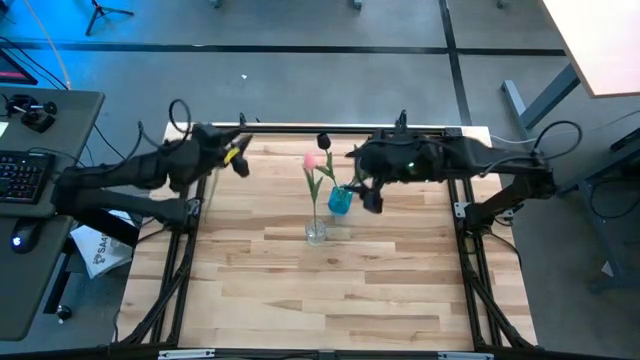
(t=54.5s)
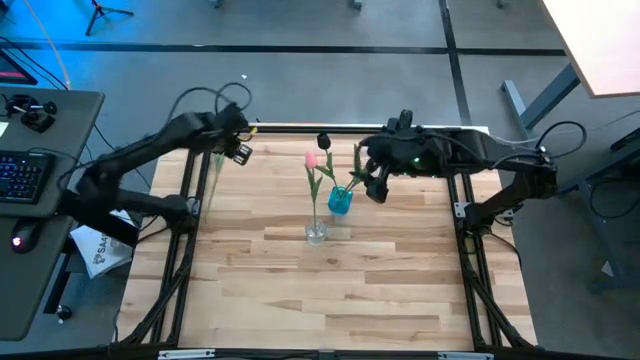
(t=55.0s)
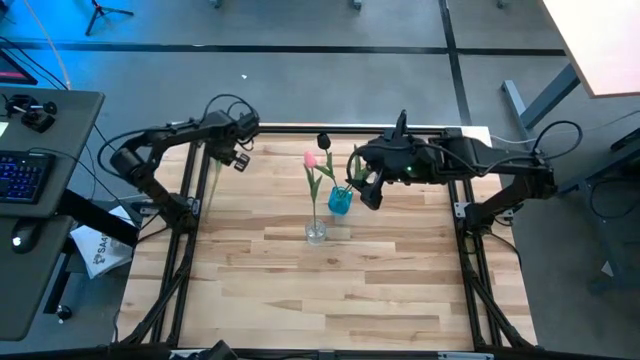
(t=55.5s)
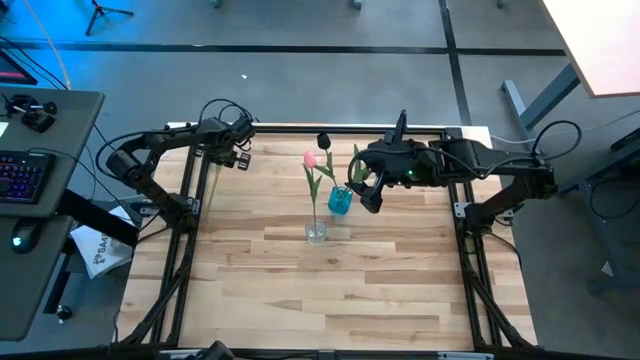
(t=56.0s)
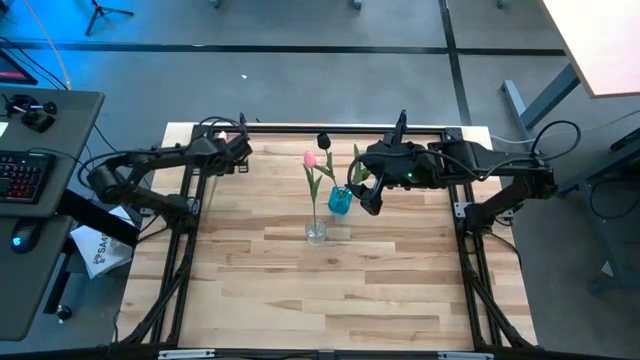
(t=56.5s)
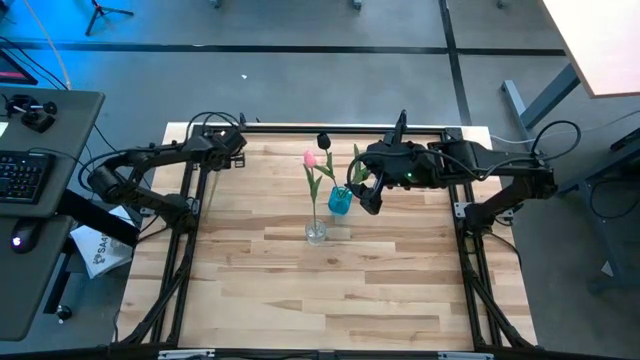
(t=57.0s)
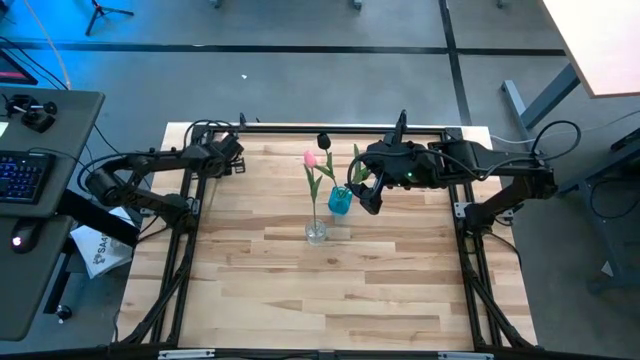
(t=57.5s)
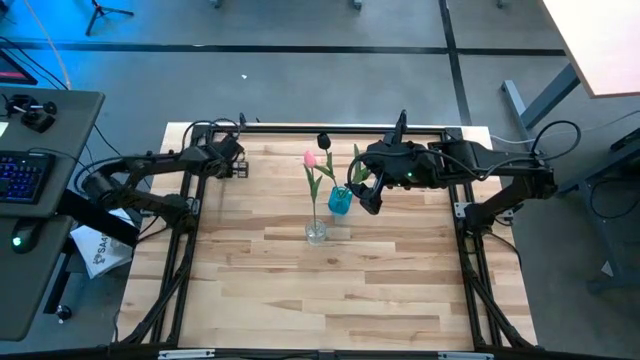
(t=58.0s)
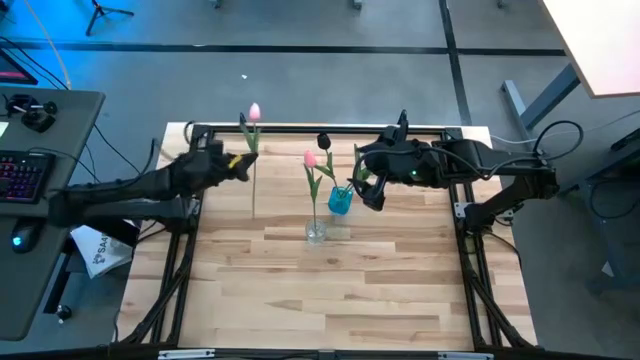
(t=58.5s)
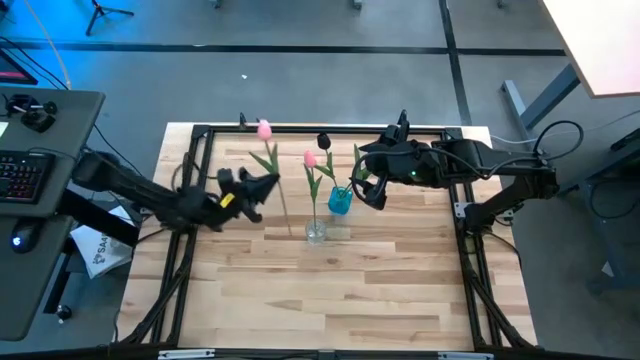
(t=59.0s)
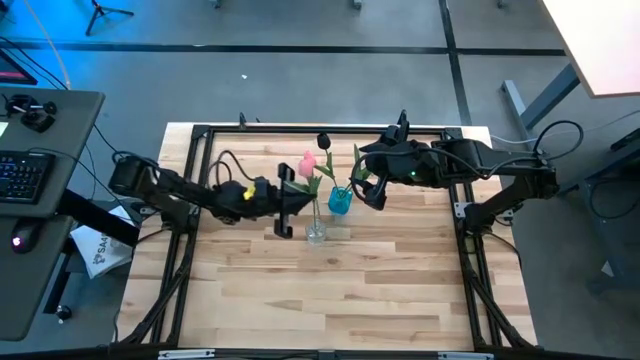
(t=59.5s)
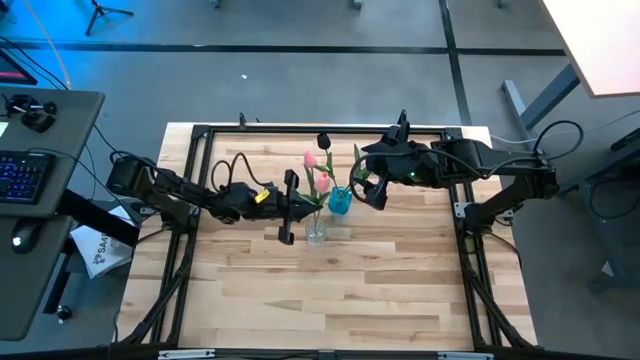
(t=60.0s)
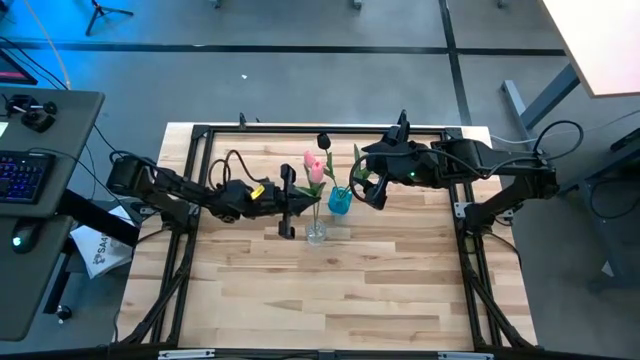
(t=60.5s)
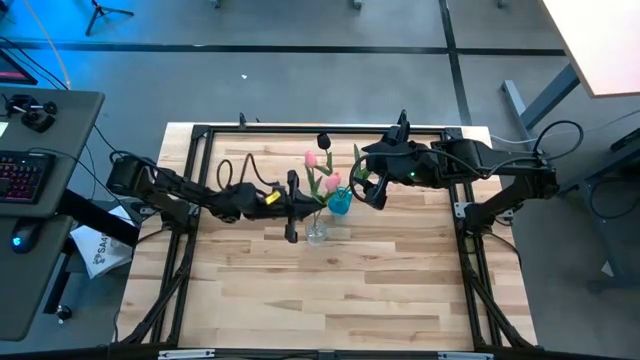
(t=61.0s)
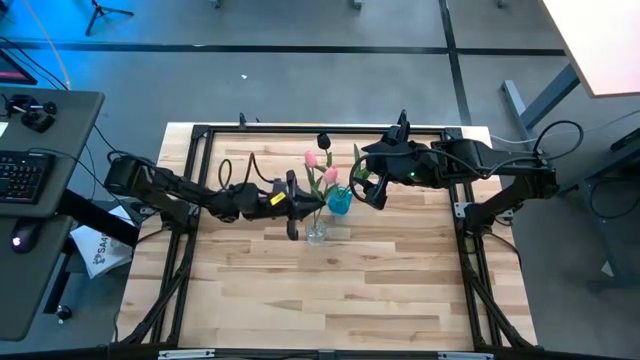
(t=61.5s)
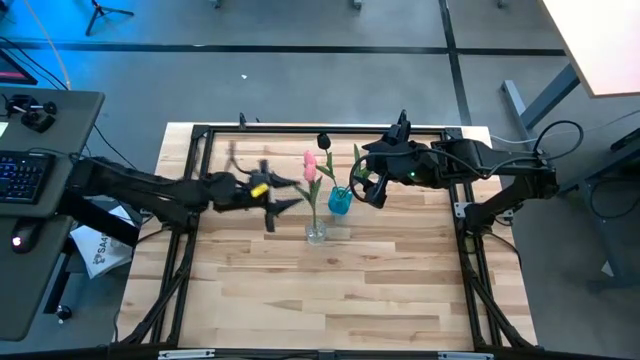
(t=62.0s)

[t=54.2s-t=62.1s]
Task: Sort flowers into vase by color
Put the pink tulip into the transparent vase

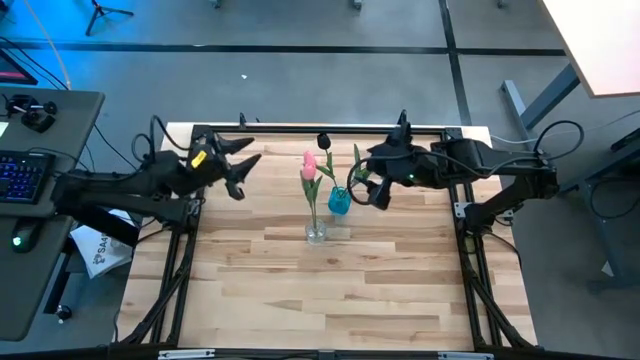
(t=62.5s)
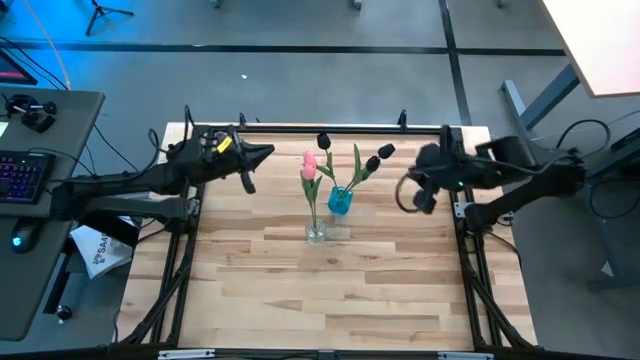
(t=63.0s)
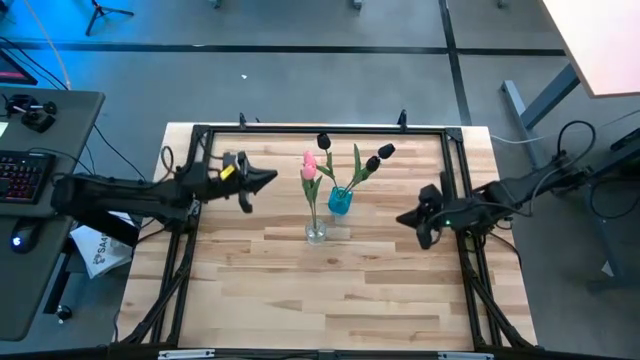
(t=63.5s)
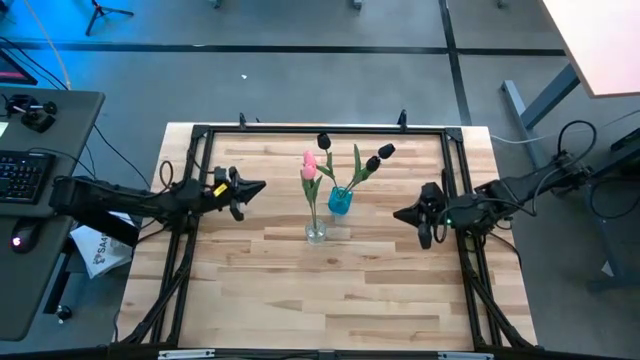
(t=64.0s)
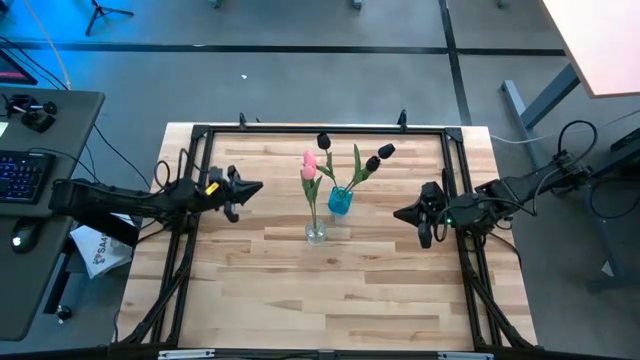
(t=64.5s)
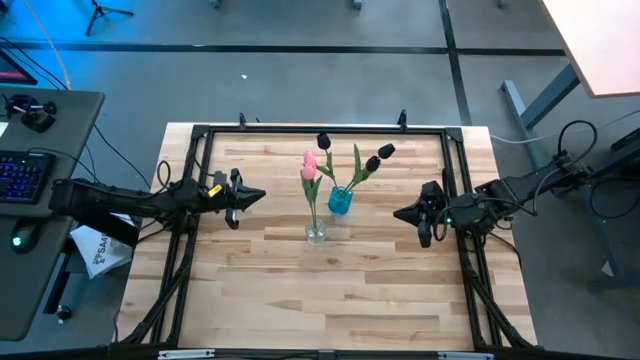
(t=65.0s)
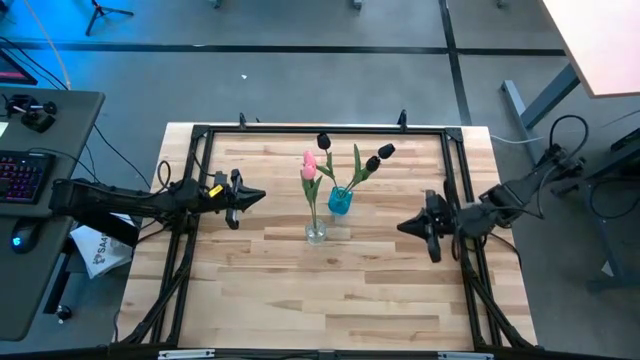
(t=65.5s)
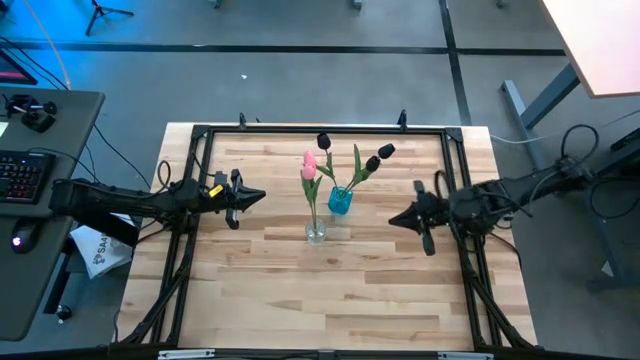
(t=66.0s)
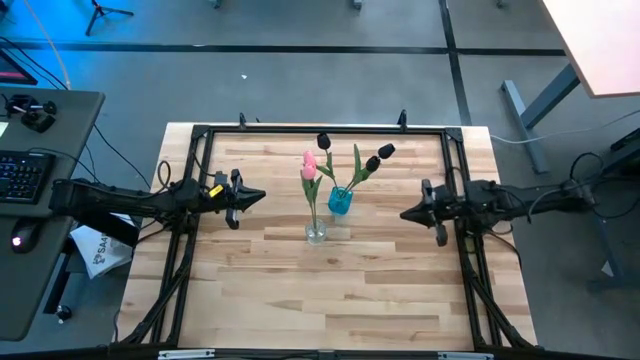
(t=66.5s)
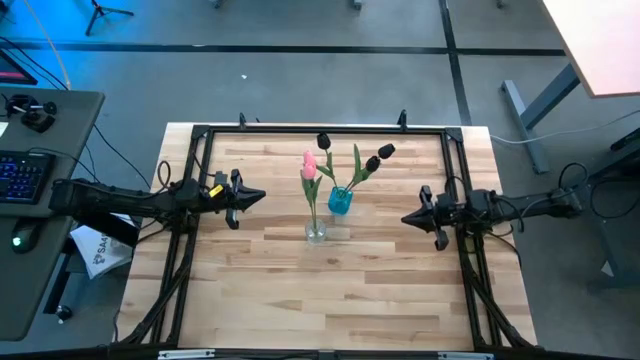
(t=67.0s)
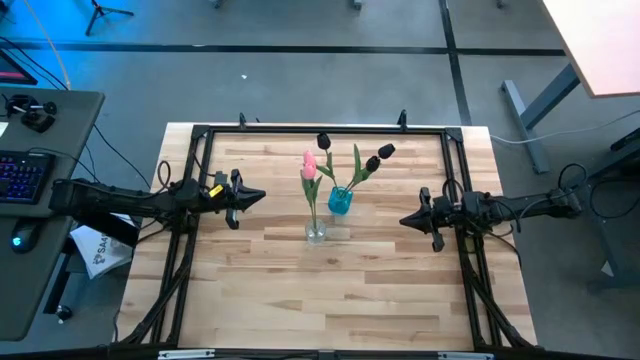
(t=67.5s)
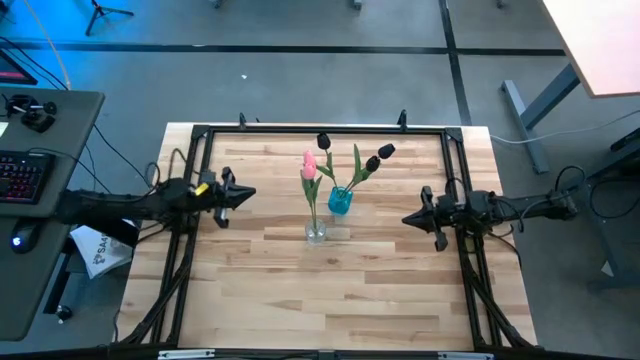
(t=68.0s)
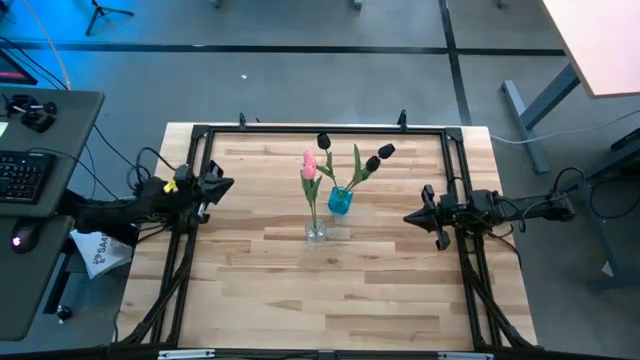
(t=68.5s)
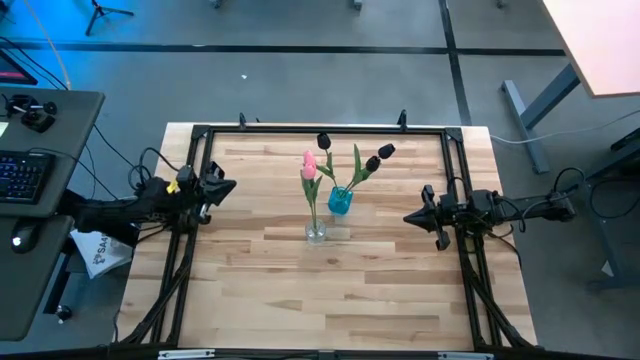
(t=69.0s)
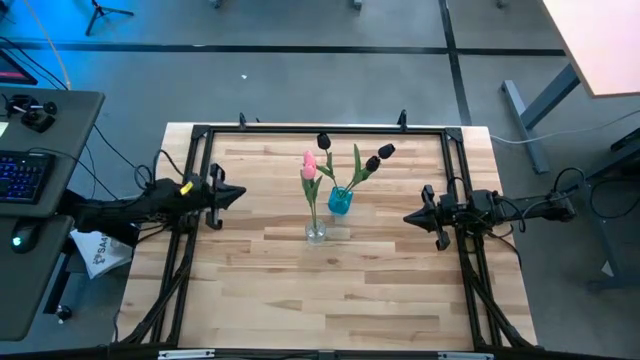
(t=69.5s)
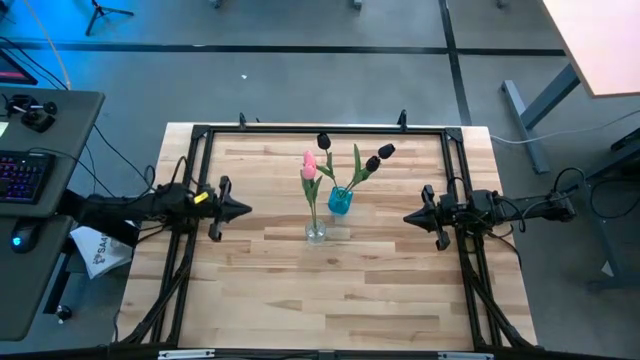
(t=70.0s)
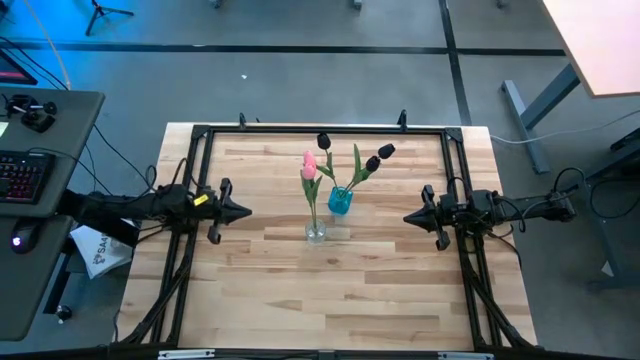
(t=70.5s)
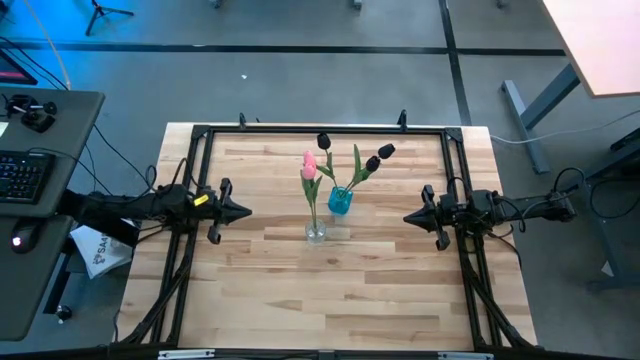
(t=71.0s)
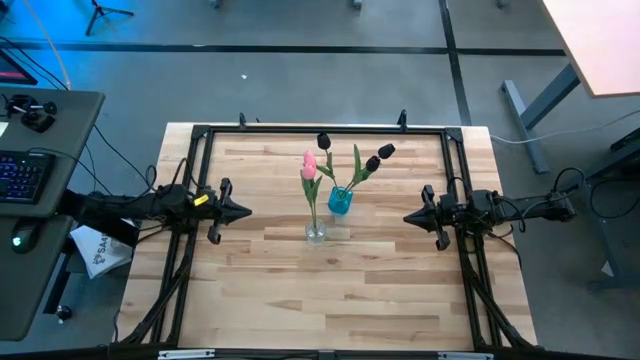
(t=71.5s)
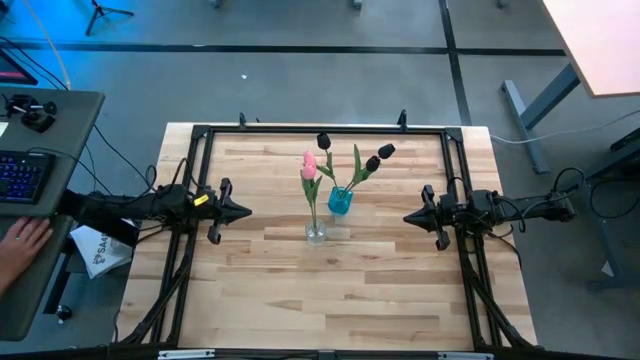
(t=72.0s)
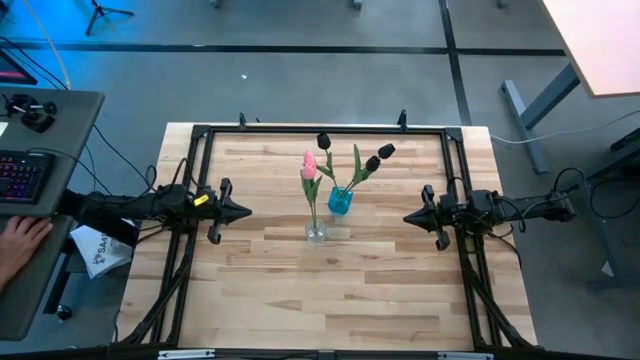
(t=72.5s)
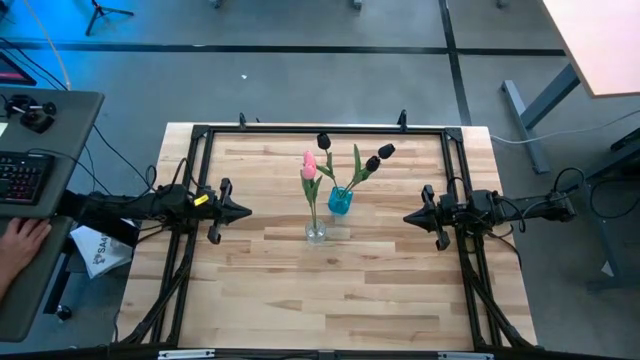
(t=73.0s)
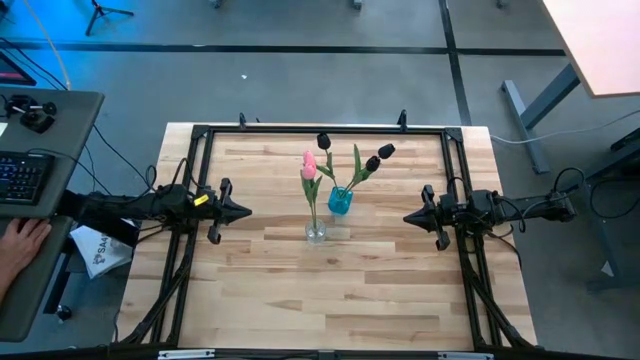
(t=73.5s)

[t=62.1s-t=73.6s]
Return to Home Position

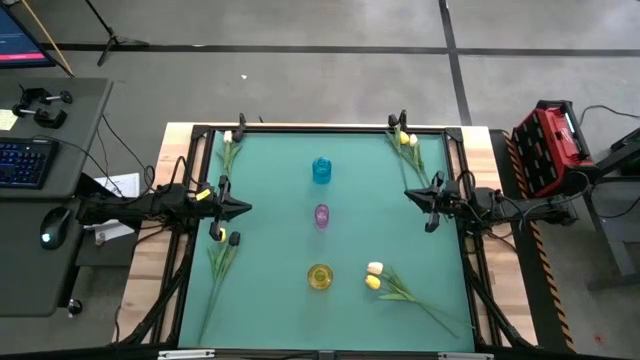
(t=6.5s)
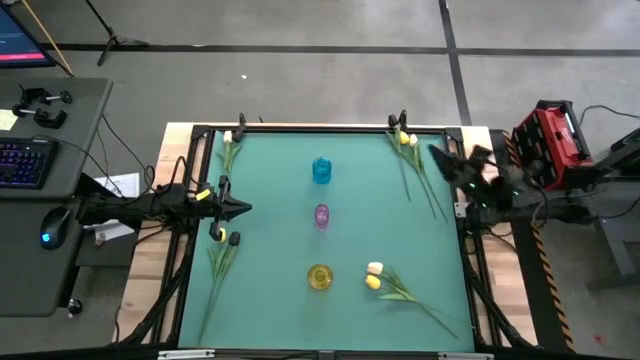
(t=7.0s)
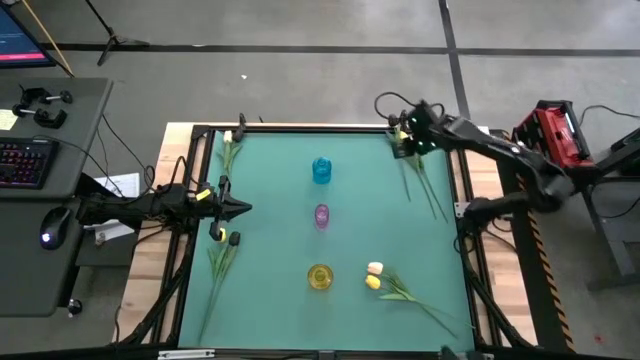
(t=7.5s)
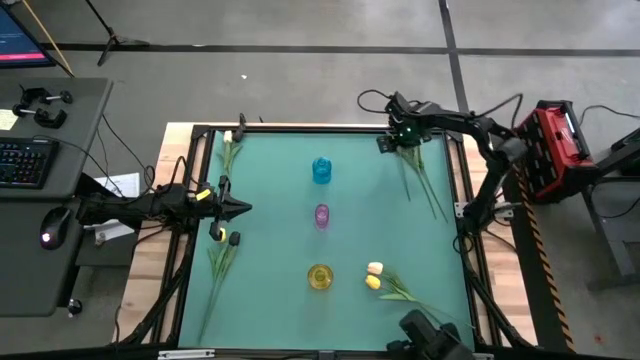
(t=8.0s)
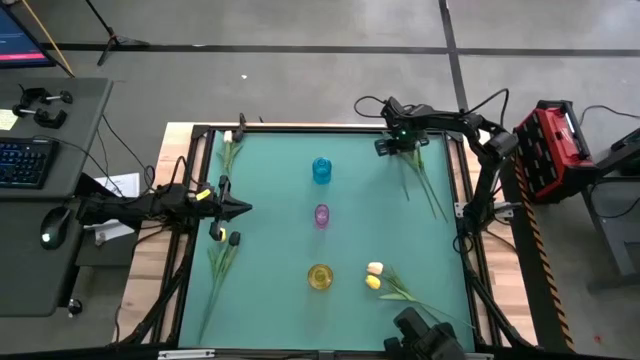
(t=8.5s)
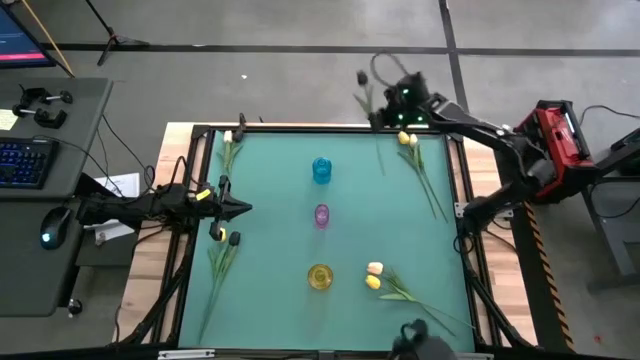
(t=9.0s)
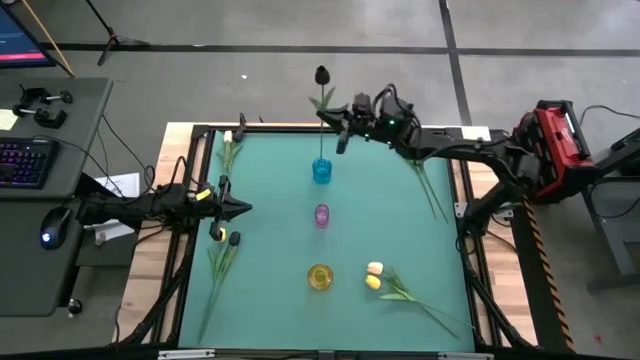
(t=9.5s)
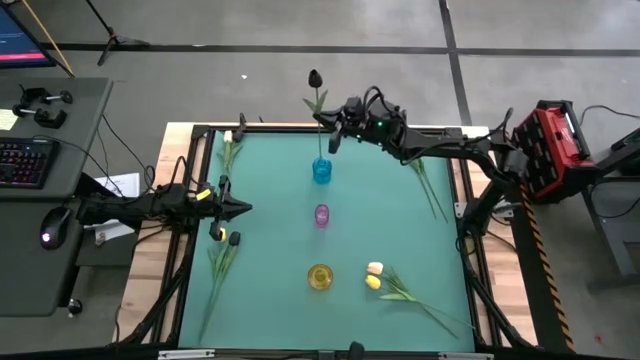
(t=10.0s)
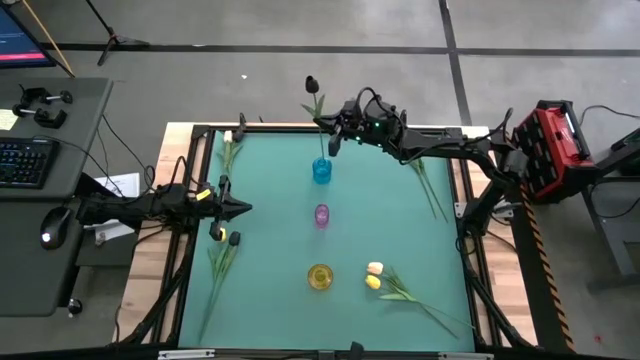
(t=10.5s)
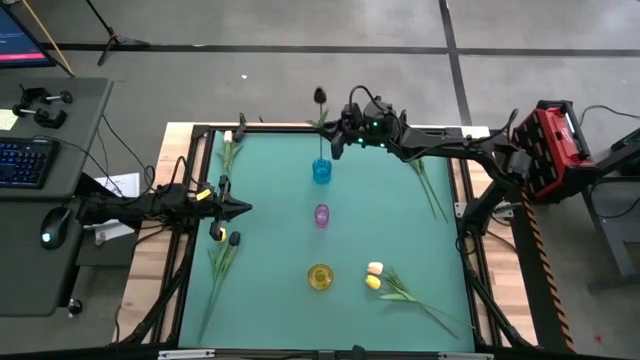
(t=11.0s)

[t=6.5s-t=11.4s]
Task: Sort flowers into vase by color
Put the top right black tulip into the blue vase
